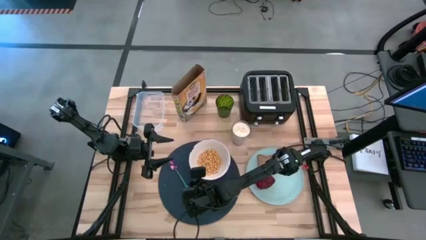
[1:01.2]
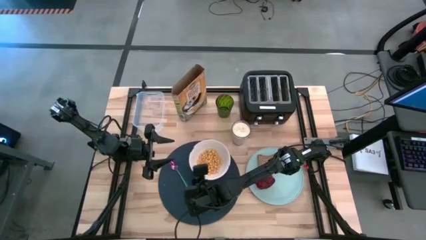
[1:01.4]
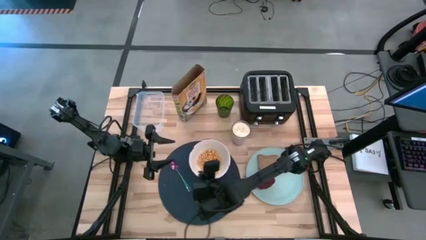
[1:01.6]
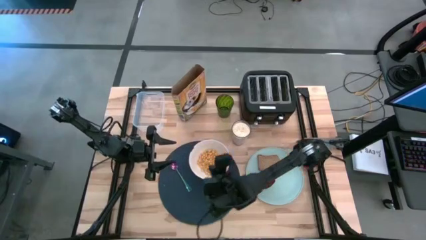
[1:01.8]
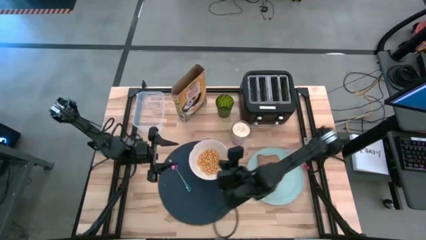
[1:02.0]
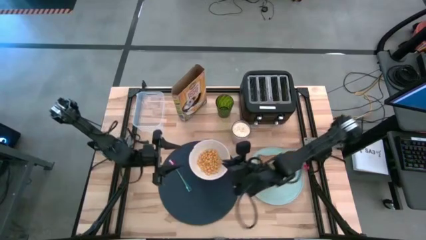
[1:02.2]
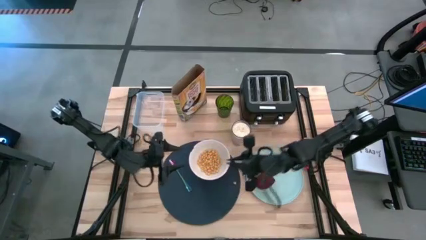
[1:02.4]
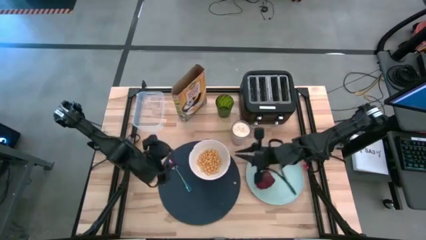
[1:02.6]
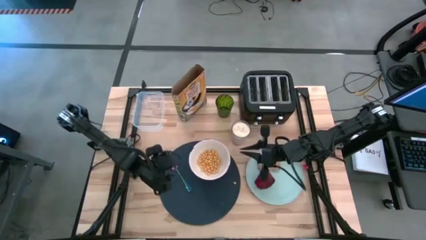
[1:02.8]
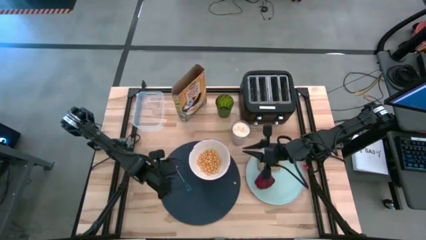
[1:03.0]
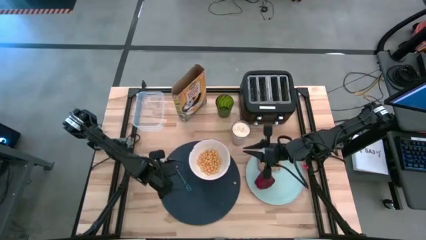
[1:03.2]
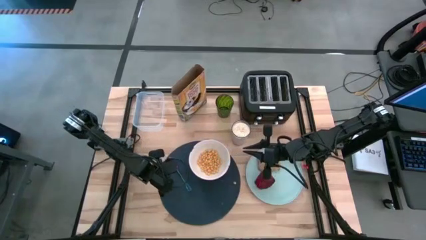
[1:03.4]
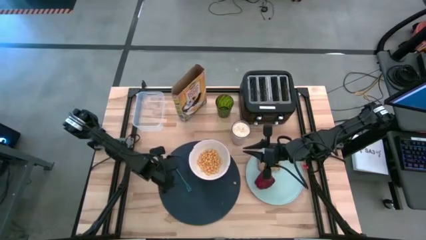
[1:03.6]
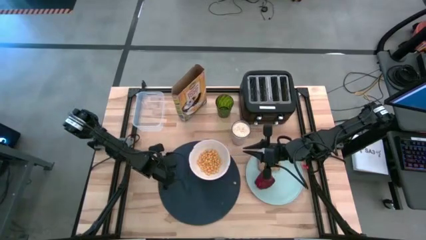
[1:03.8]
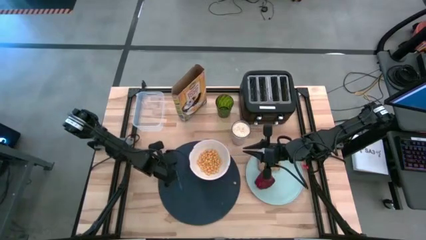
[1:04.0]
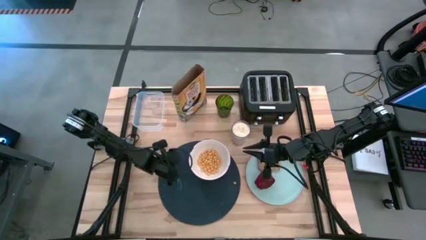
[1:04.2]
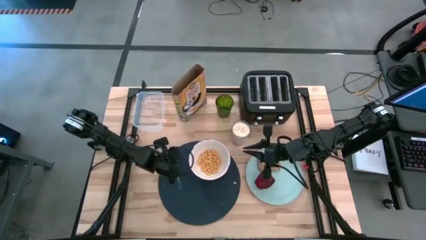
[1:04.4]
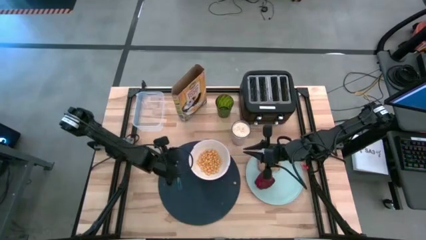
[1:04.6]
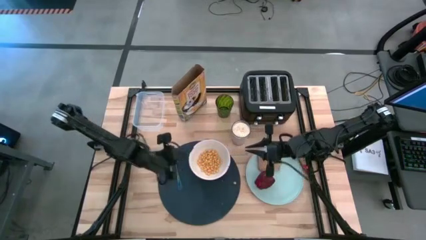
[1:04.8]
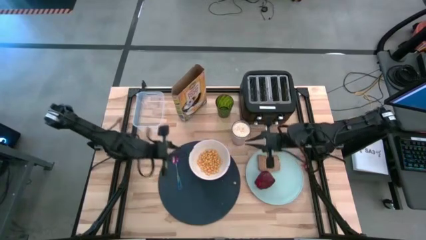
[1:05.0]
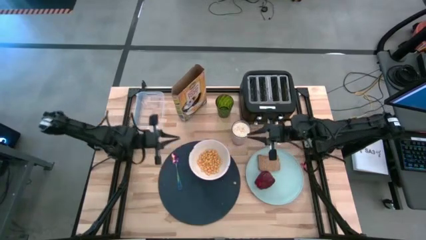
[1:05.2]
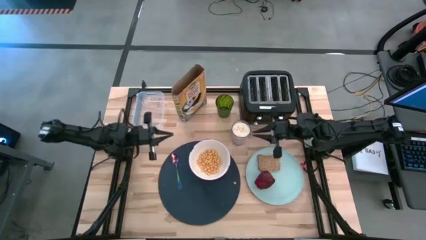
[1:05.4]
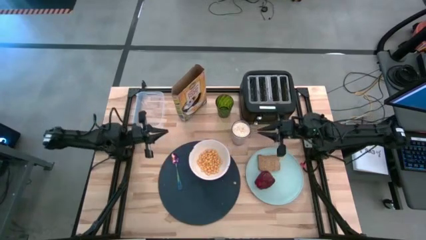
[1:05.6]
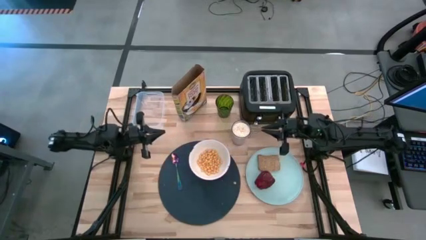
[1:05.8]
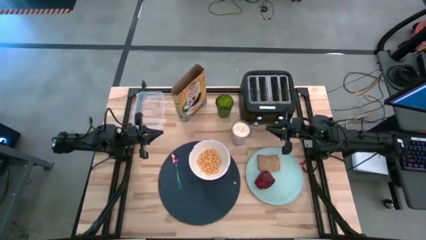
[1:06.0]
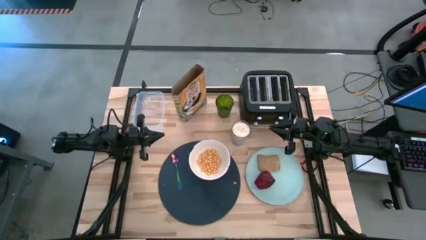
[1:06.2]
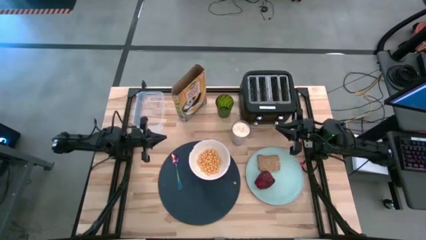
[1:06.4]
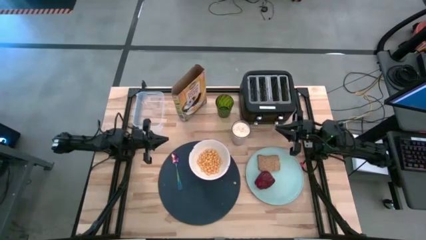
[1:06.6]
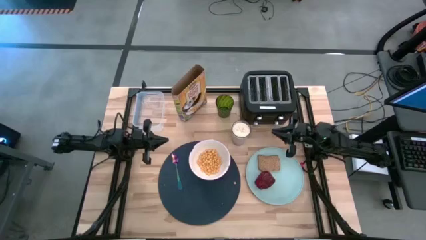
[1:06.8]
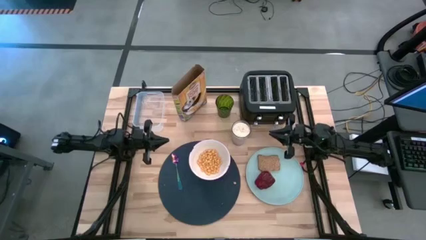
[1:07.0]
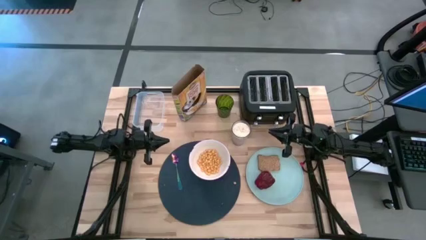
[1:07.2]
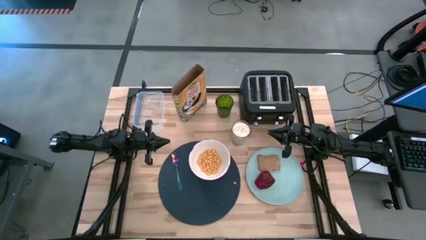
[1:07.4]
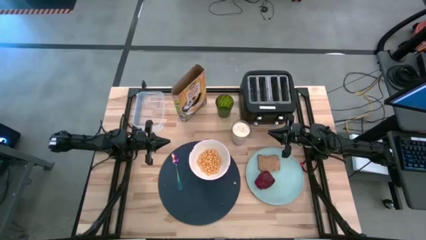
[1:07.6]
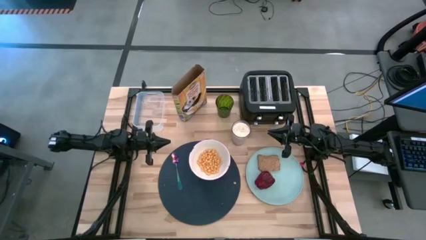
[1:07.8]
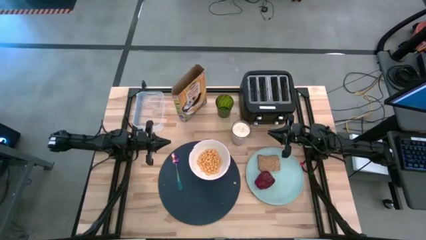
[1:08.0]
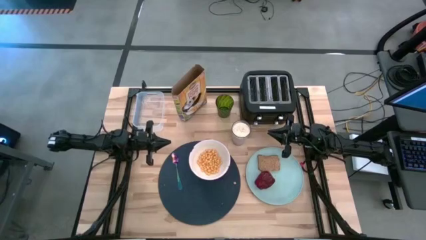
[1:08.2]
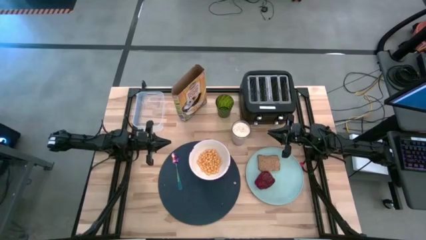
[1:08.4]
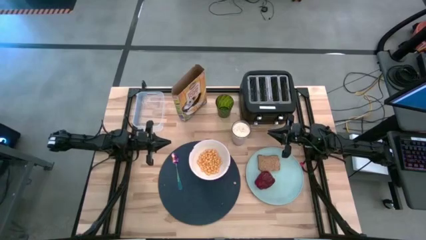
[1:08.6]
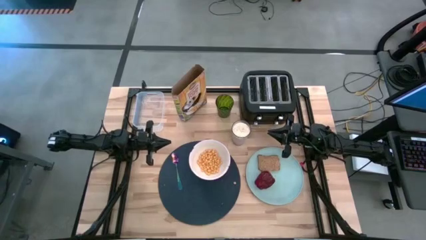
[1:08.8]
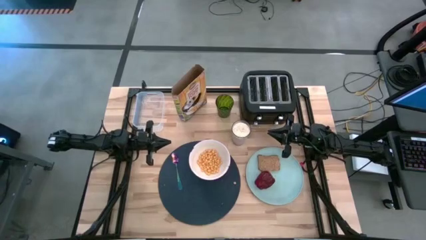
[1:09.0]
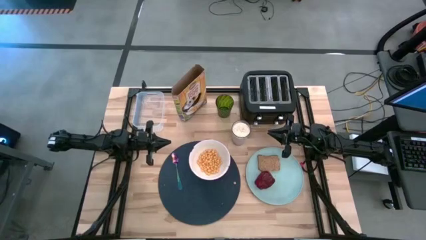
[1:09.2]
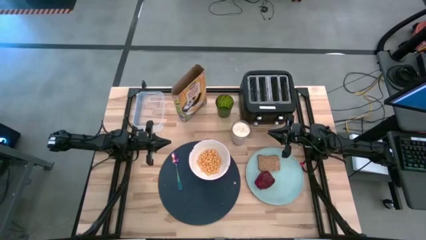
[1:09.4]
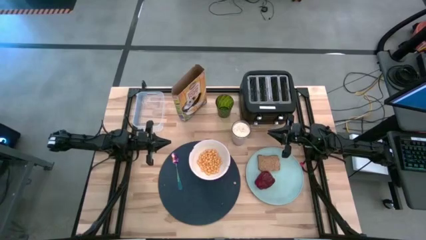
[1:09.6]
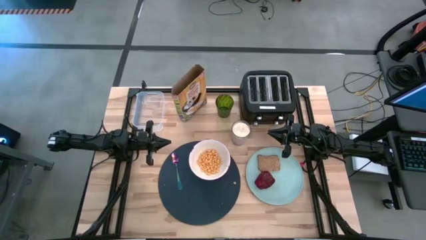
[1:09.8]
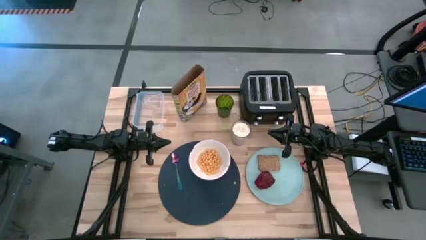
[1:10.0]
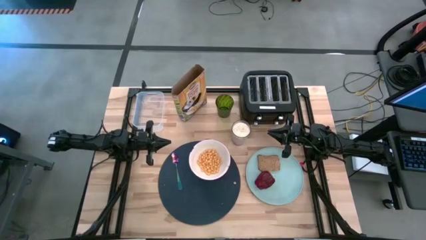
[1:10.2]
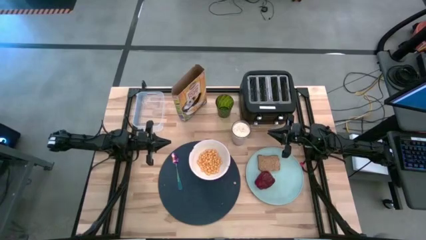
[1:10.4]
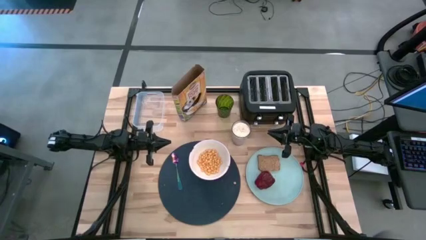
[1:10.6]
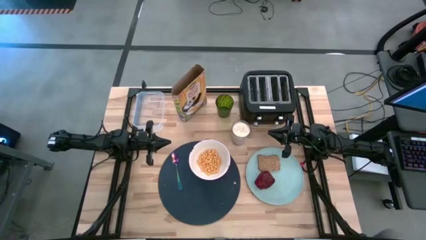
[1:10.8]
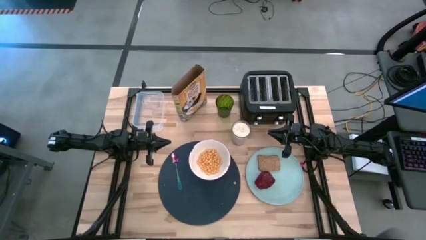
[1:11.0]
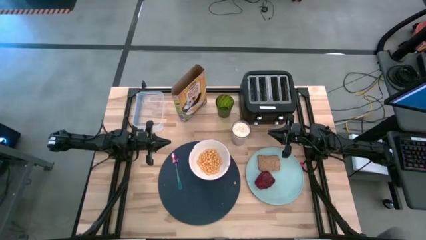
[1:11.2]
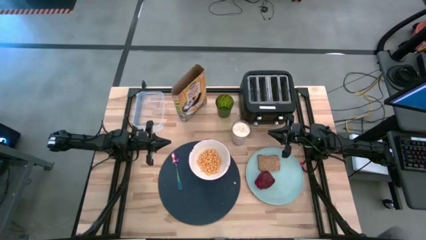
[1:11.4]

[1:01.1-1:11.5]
Task: Arrange a breakfast setting
Return to Home Position

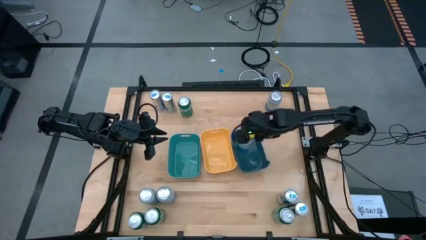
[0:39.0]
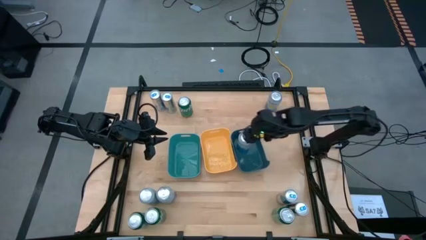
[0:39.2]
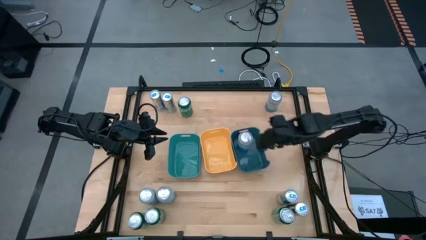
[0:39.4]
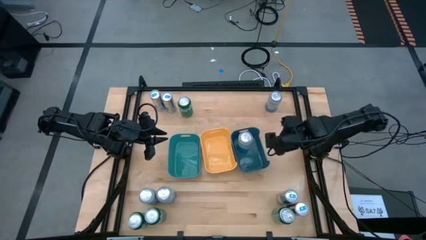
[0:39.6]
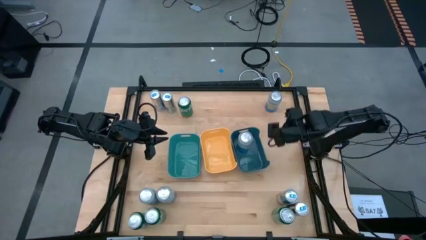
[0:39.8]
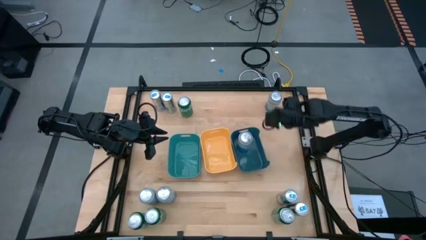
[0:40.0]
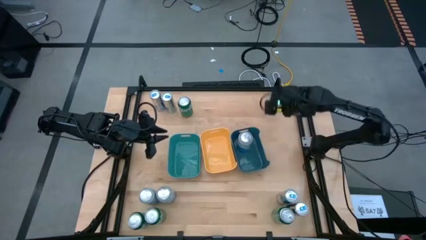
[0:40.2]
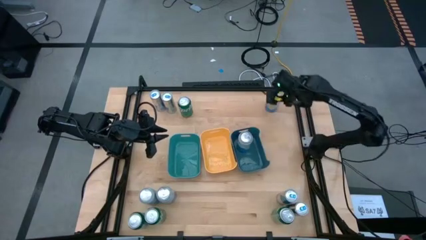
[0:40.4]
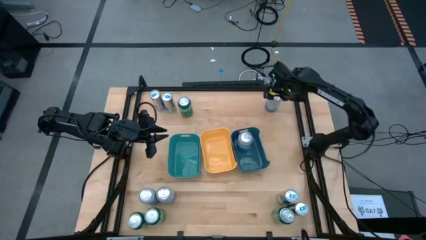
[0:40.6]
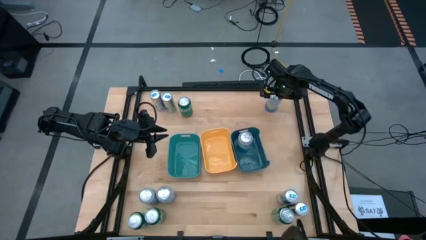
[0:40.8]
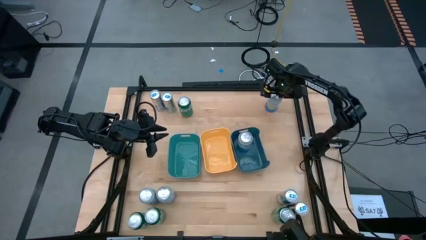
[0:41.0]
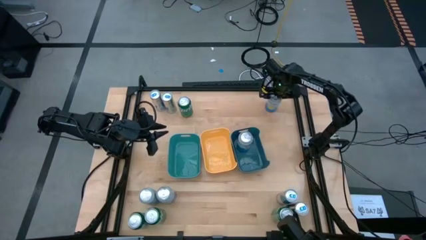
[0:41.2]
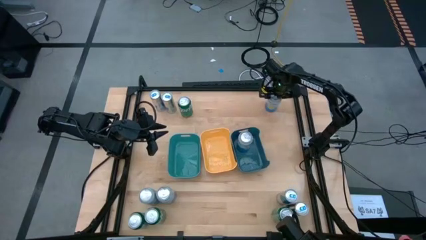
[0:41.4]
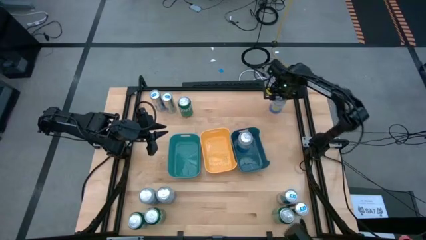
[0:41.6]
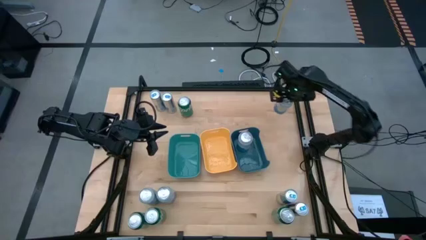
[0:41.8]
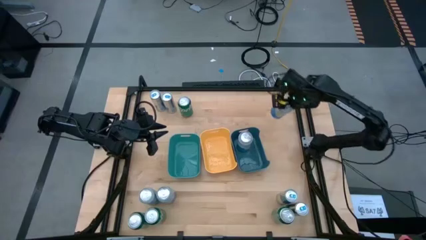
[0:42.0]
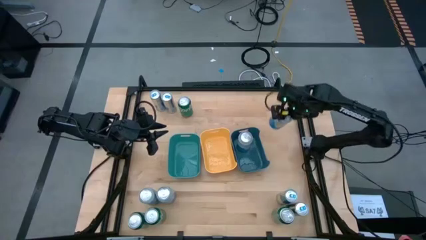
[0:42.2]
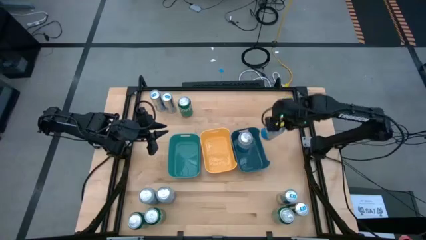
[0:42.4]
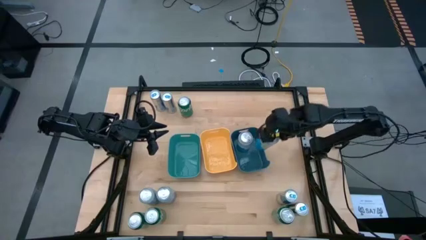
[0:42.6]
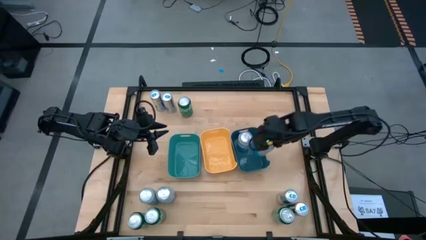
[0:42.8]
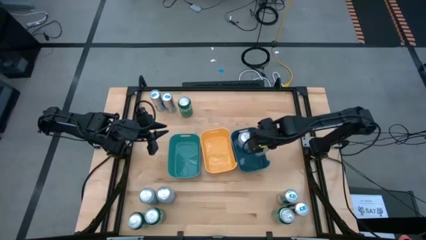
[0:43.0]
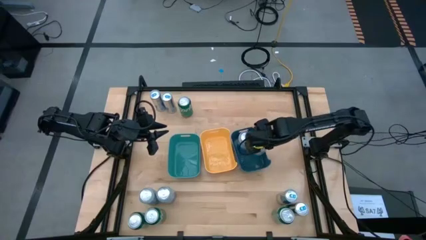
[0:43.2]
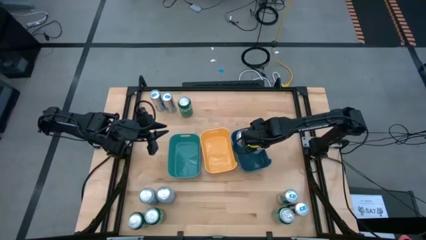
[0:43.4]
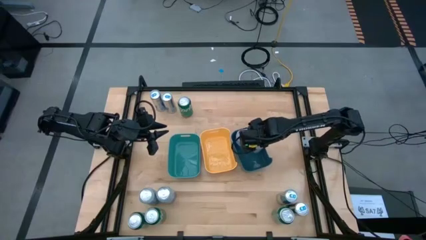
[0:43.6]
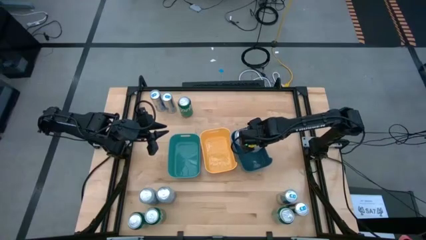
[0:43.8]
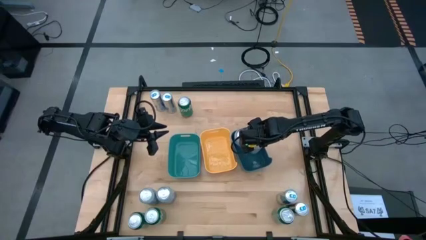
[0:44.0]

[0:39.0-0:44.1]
Task: Sort soda cans
Put the blue and white soda can into the dark blue bin
